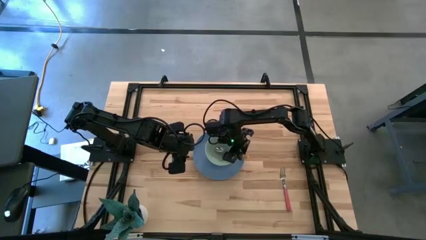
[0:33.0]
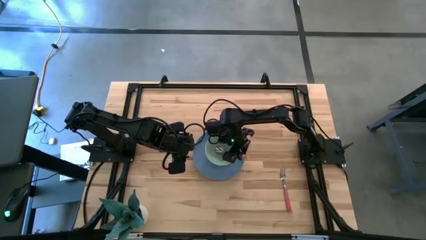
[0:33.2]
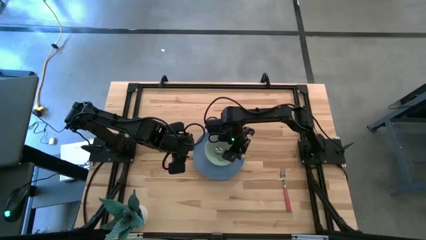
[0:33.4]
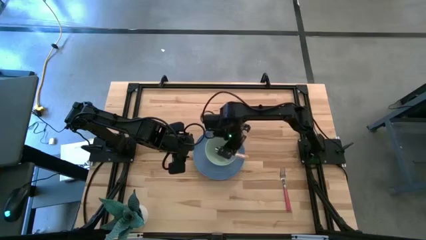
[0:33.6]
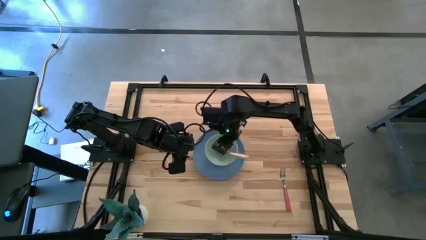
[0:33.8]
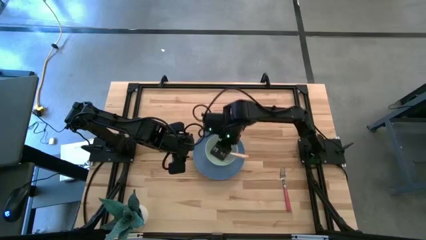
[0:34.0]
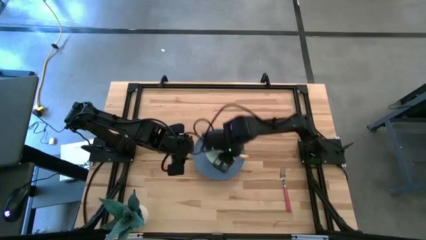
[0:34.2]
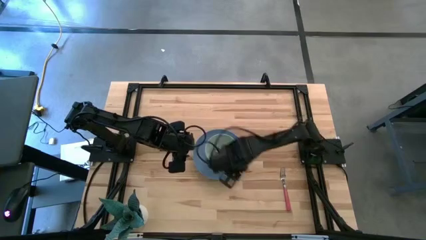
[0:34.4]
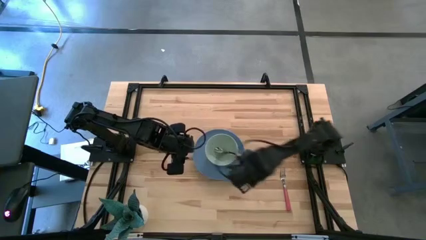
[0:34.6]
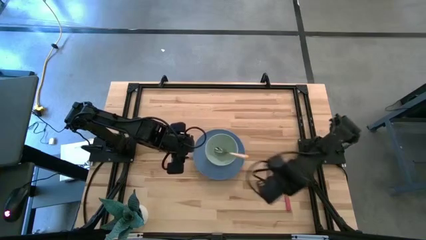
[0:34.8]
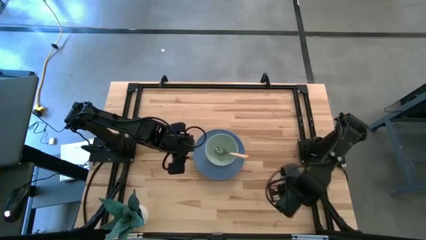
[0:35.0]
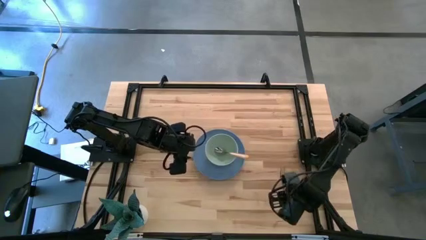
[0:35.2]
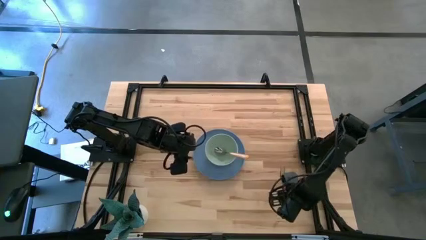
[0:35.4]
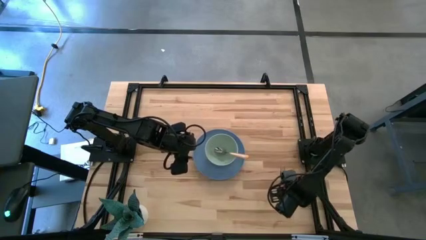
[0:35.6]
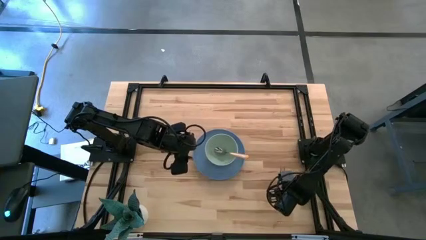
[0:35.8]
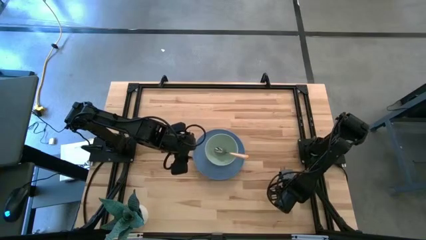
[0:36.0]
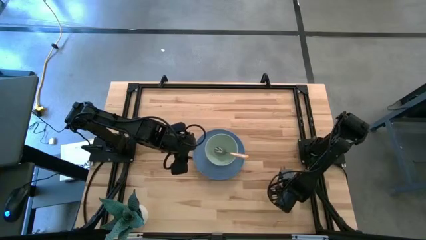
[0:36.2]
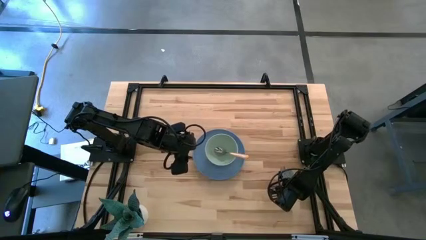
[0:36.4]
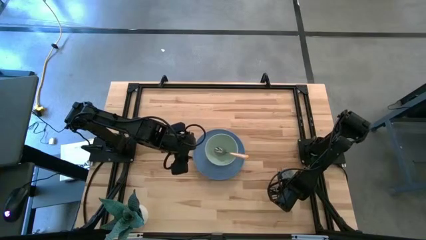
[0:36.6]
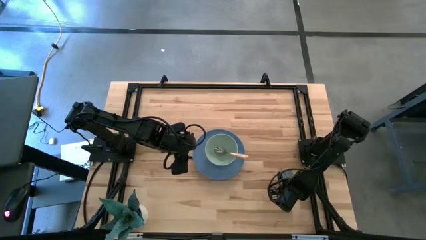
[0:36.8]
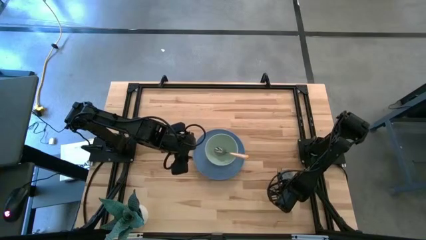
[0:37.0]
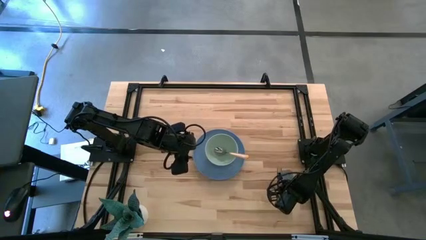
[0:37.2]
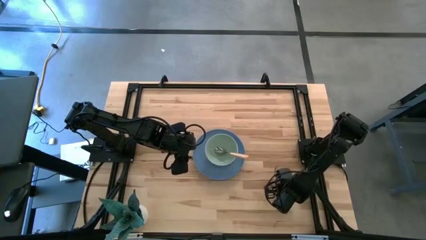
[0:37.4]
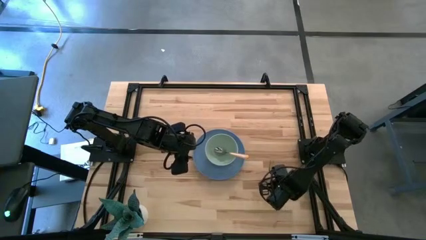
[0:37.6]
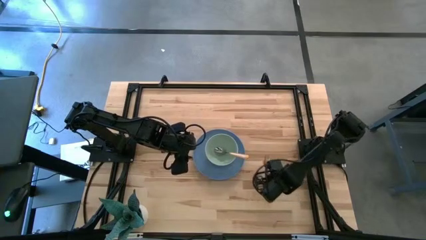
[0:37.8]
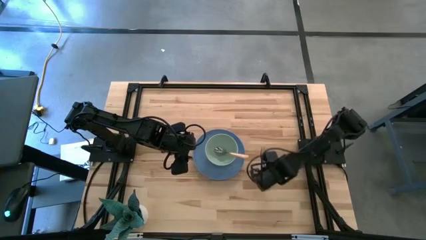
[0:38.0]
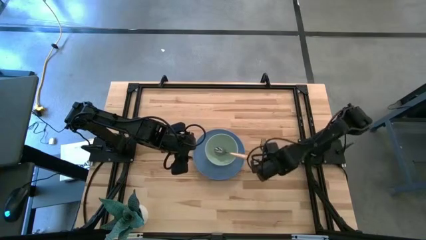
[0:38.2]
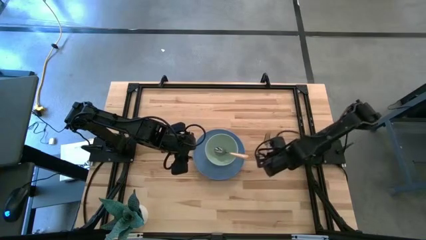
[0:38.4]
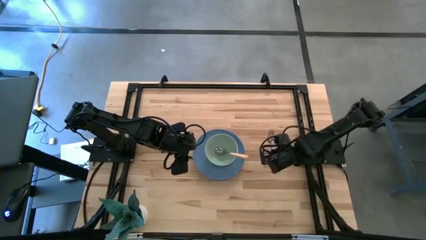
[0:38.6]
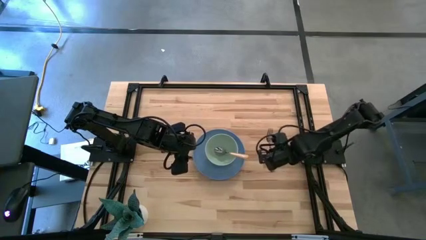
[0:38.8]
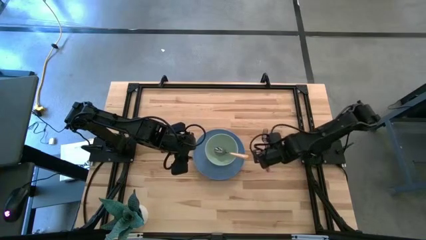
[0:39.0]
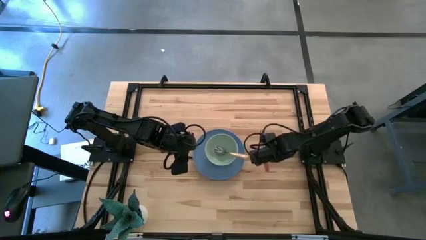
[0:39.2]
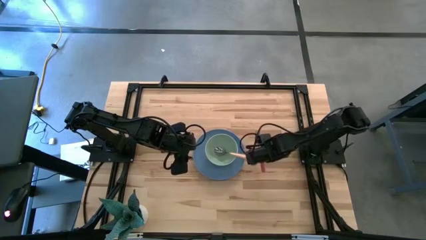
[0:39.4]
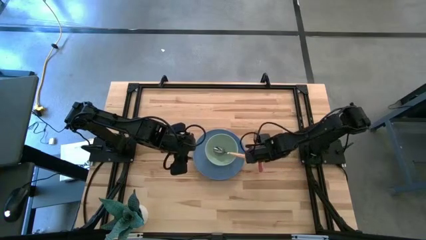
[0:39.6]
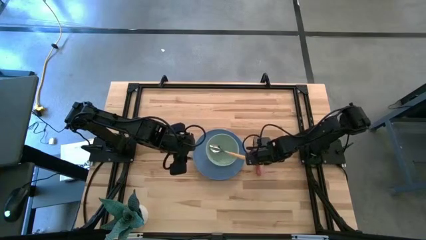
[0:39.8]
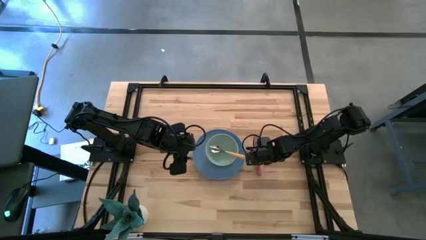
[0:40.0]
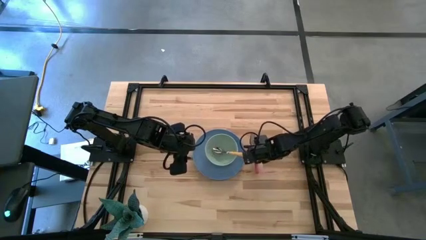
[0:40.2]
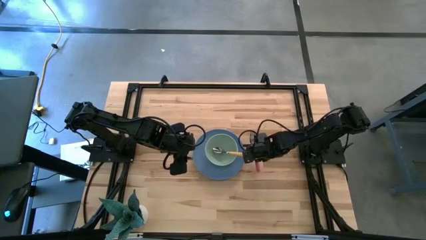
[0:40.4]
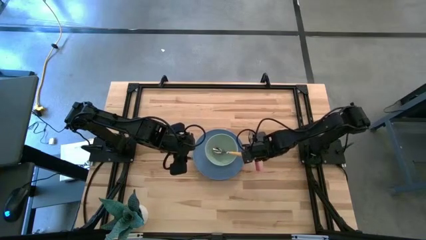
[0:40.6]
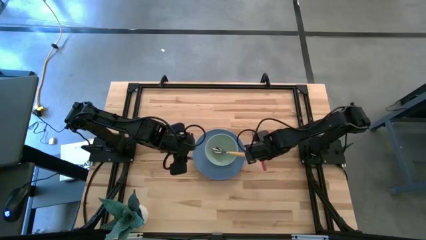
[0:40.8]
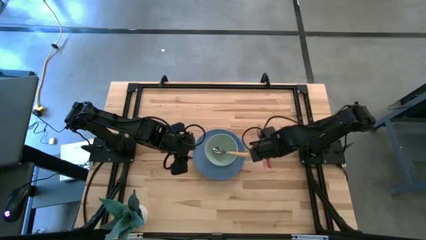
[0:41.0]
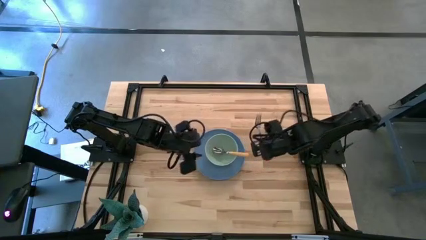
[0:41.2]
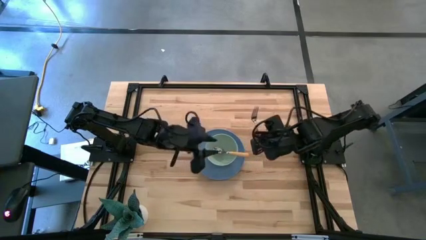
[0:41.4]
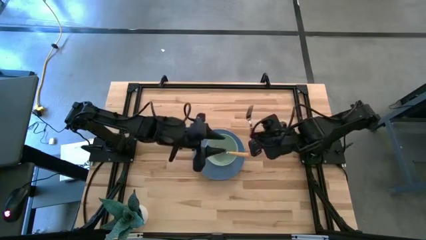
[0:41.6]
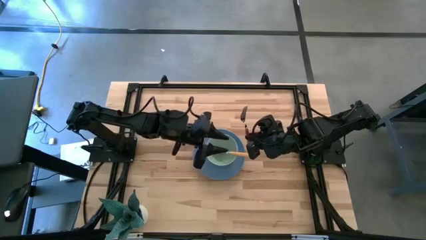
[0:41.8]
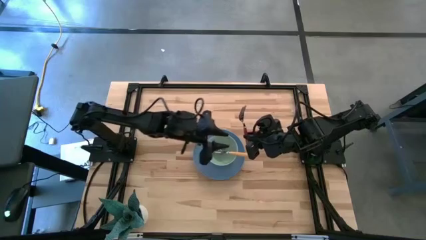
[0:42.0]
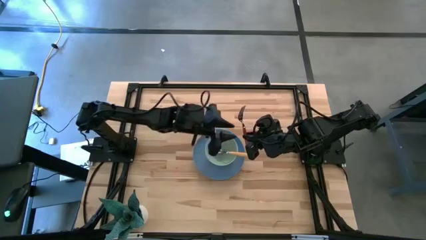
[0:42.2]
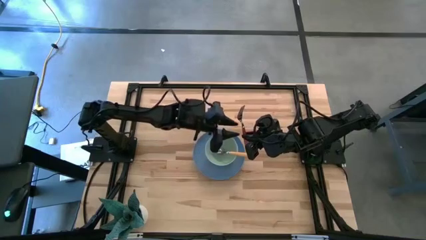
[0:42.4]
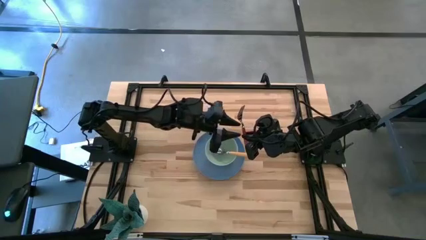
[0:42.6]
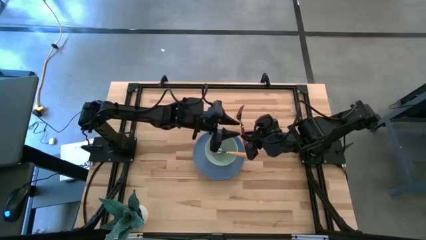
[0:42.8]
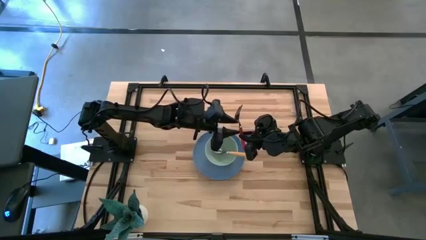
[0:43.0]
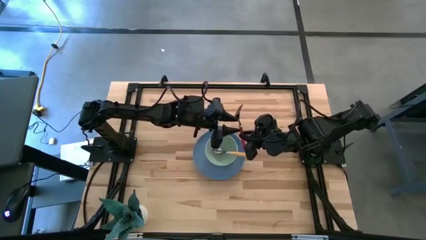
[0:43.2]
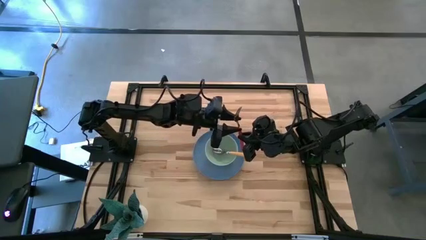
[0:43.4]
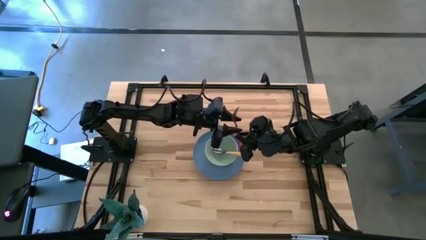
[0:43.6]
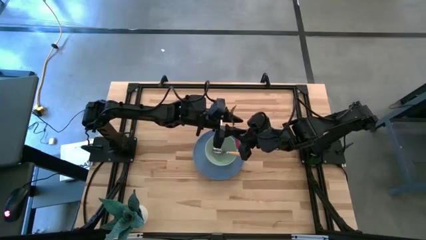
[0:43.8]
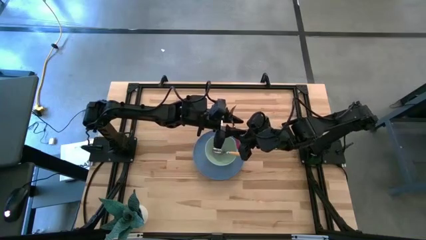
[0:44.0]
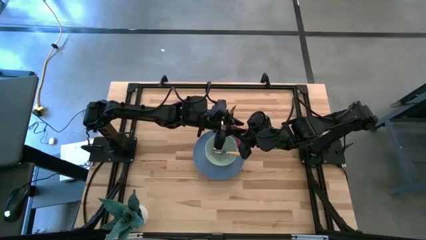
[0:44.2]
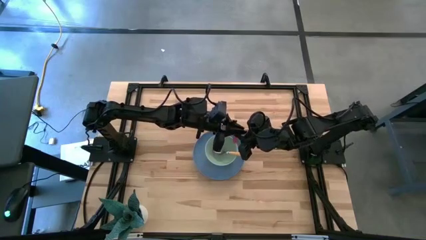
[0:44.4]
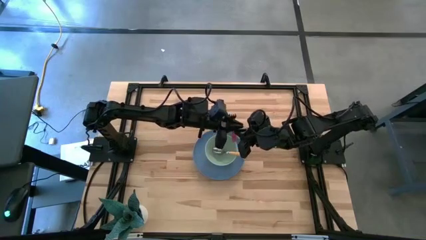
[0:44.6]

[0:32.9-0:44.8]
Task: Set table place
Move the red fork to the left of the blue plate
